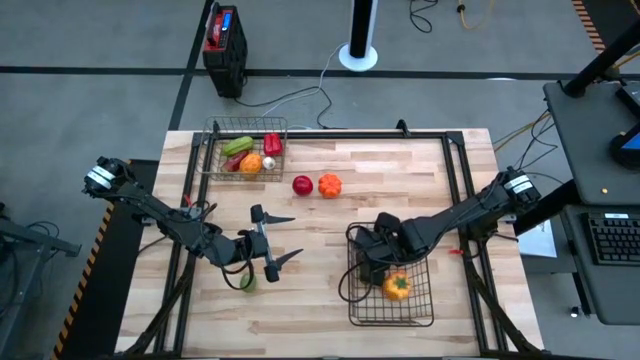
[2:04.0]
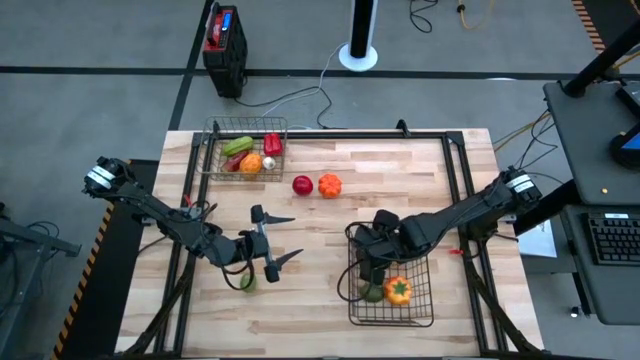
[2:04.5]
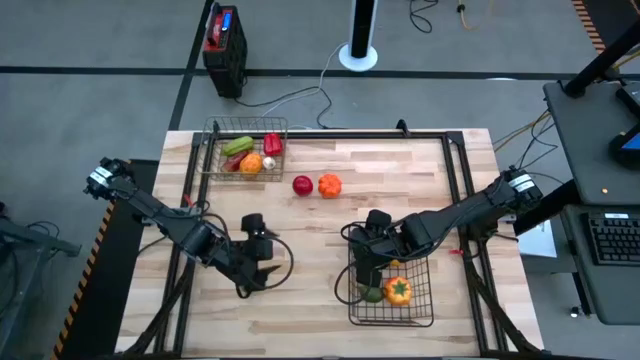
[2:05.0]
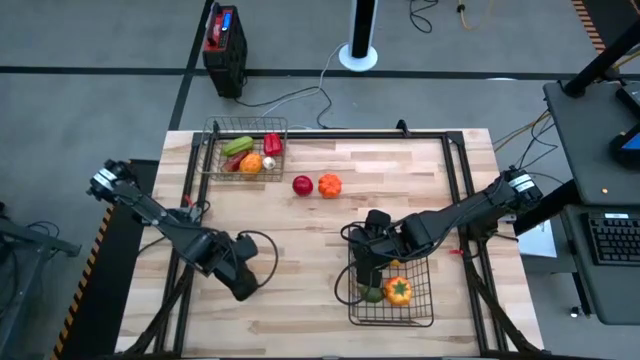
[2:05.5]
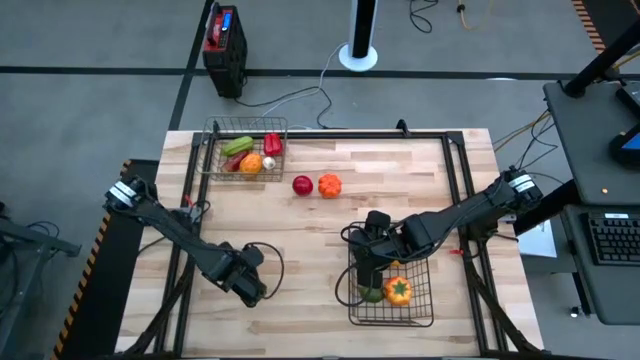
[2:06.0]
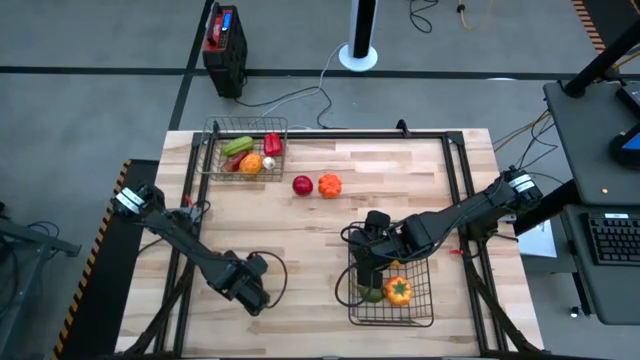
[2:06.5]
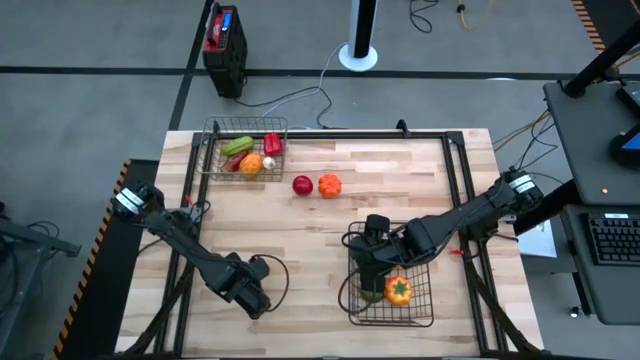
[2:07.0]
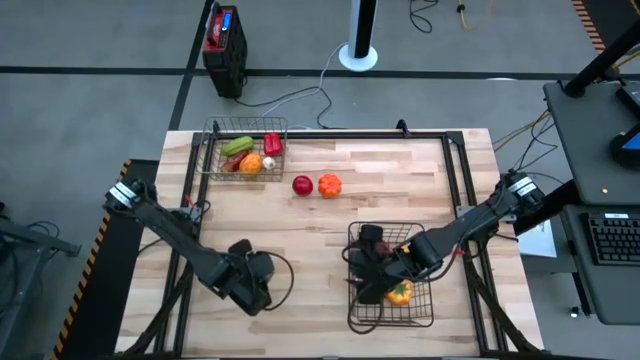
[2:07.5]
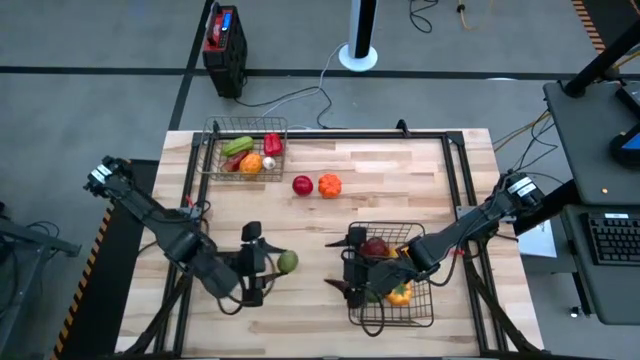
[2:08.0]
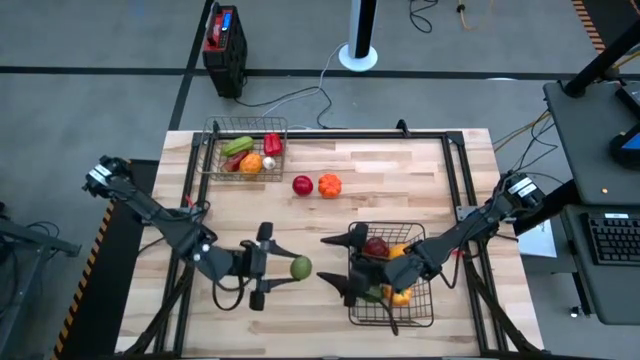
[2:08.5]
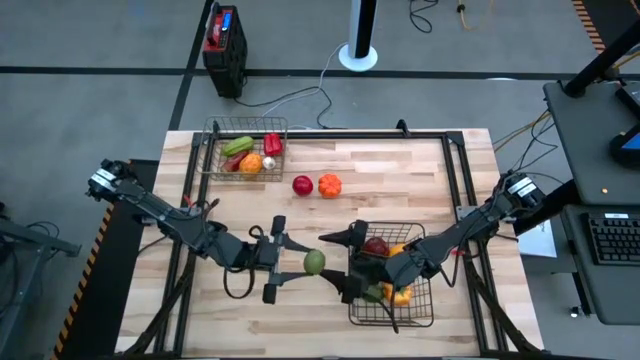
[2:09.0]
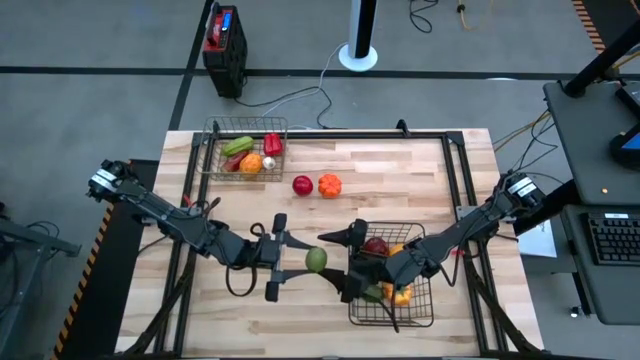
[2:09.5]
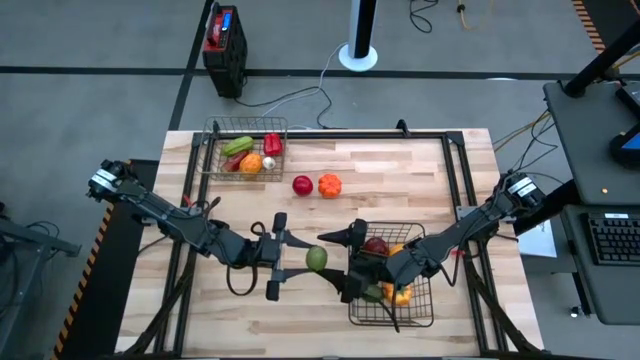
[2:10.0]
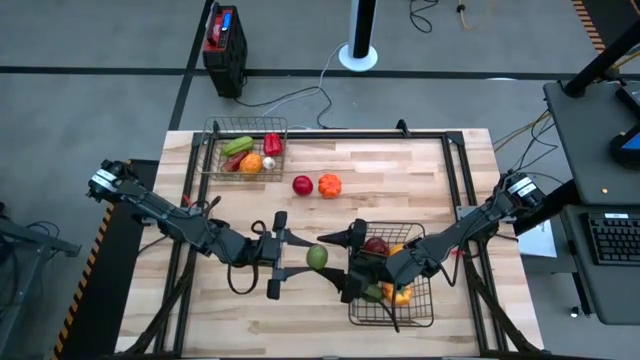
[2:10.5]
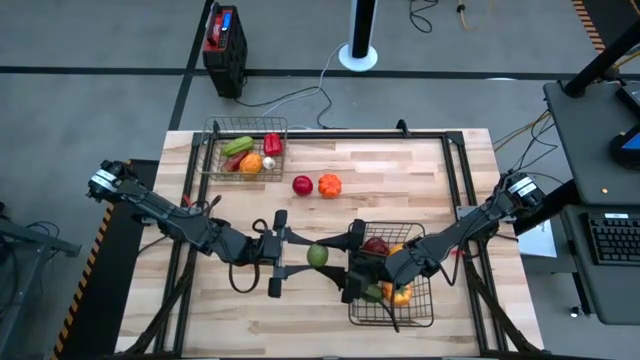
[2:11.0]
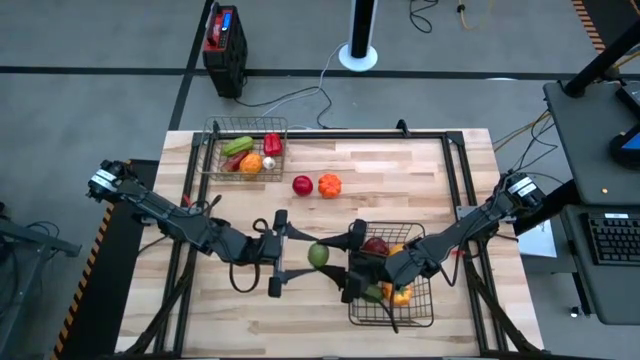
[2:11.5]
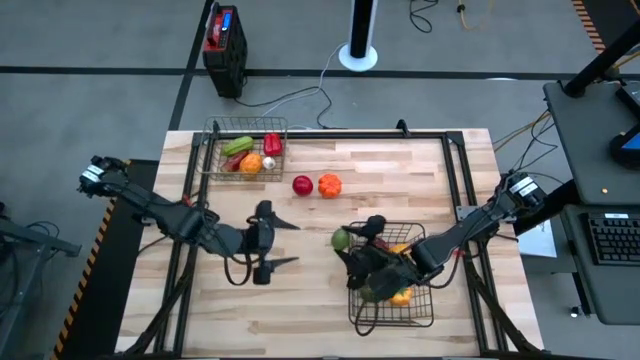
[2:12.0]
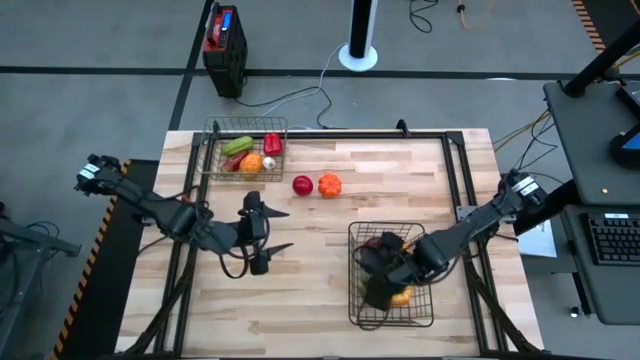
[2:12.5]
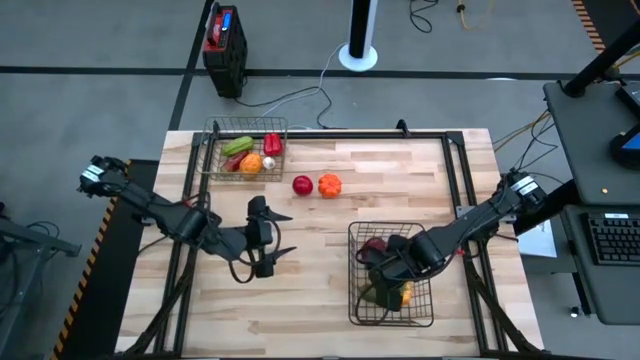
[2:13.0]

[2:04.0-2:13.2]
Task: Sort produce into baskets
Put the green lime into the black wire basket

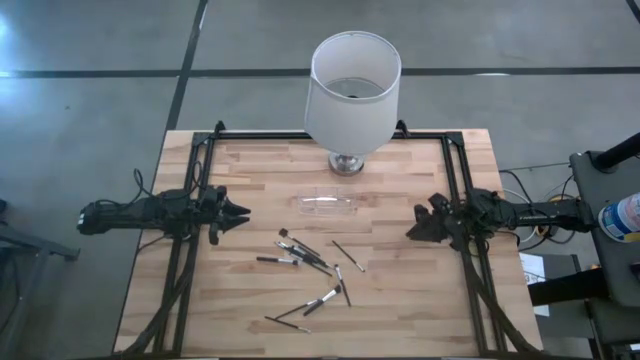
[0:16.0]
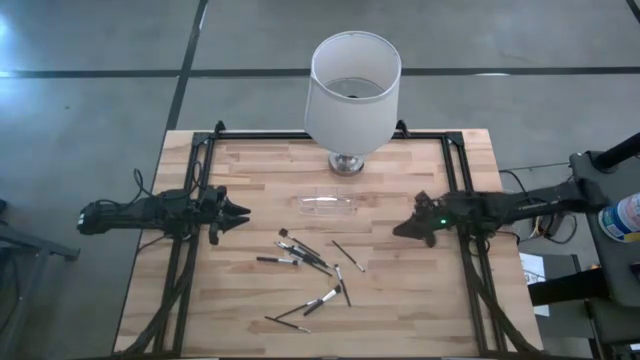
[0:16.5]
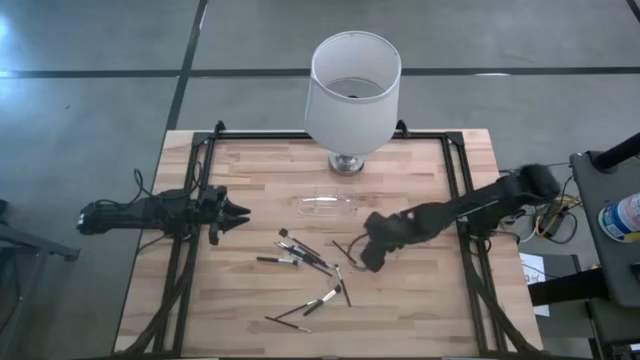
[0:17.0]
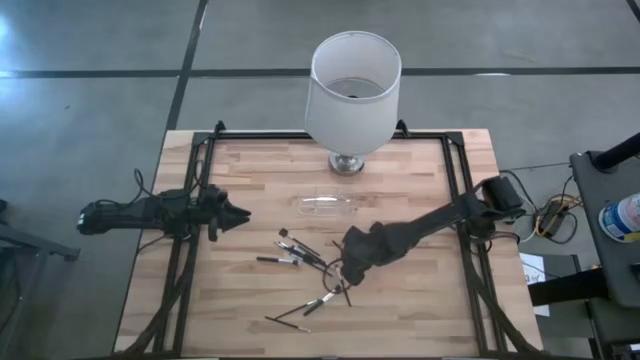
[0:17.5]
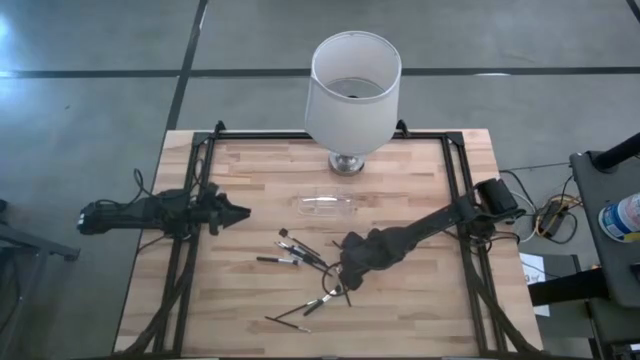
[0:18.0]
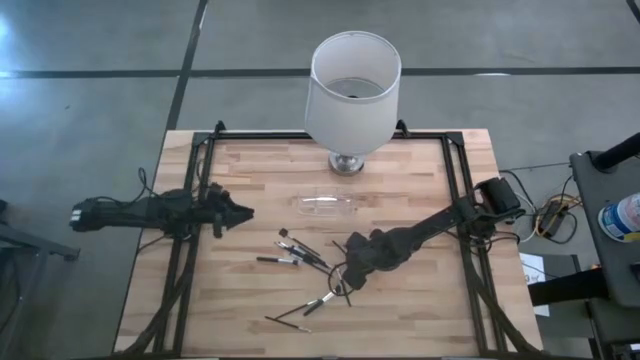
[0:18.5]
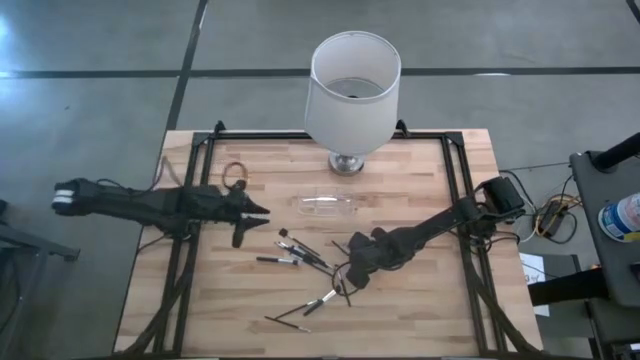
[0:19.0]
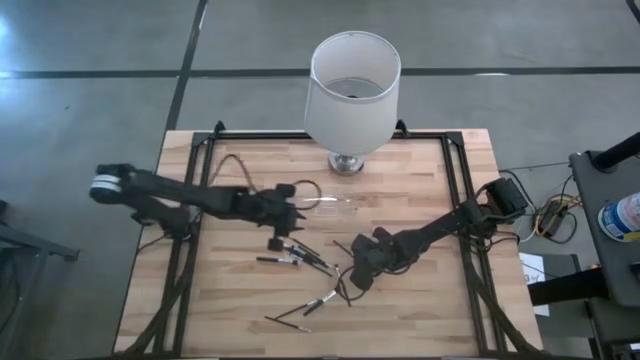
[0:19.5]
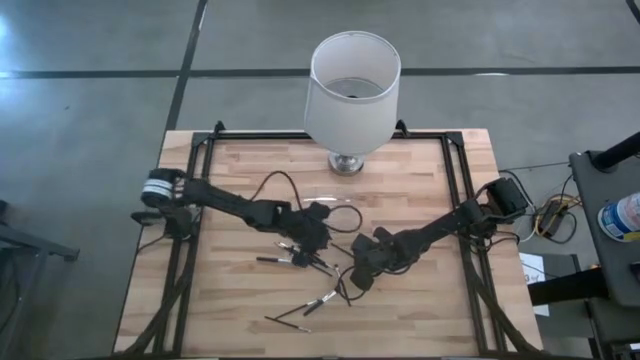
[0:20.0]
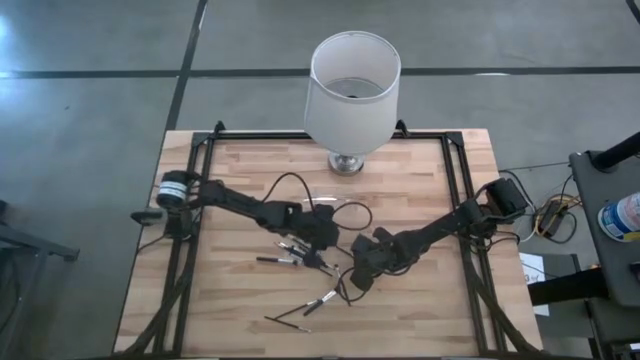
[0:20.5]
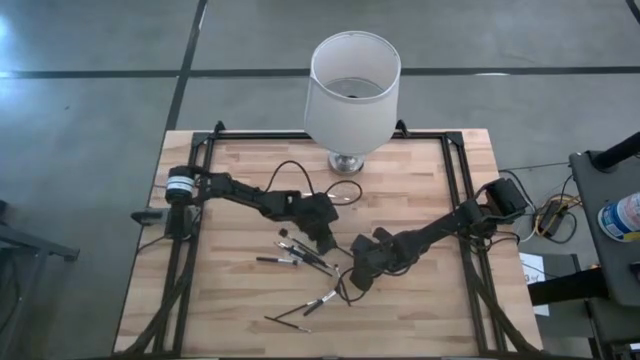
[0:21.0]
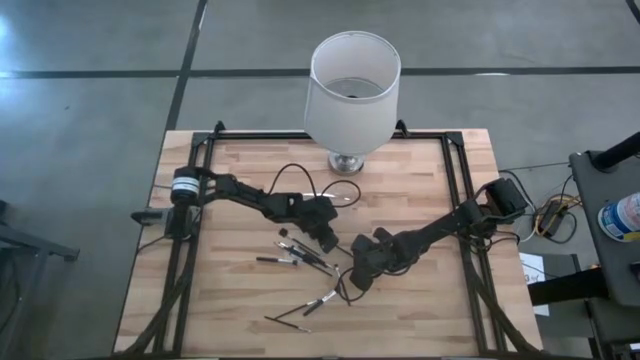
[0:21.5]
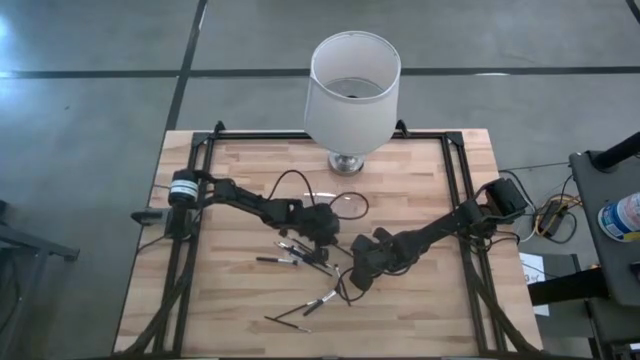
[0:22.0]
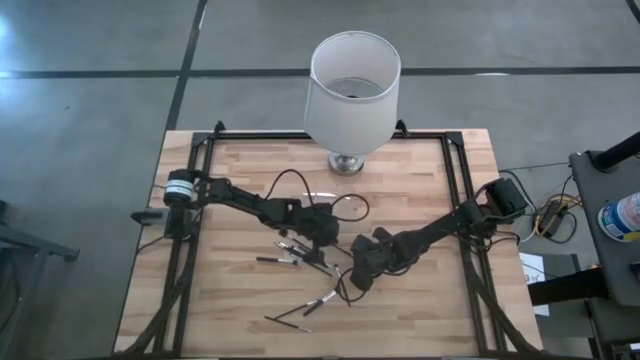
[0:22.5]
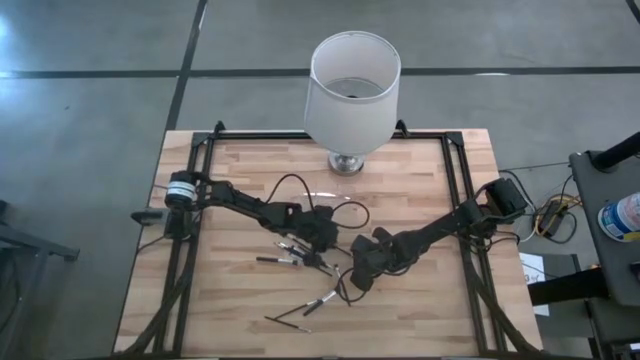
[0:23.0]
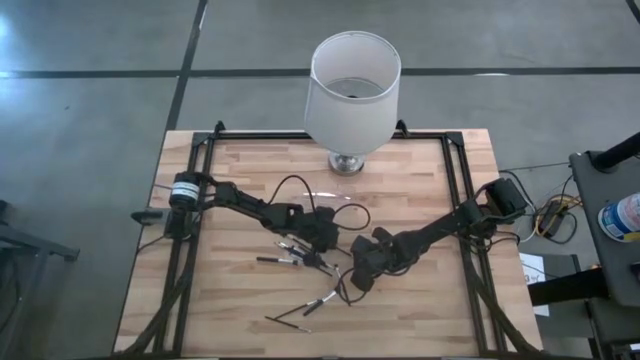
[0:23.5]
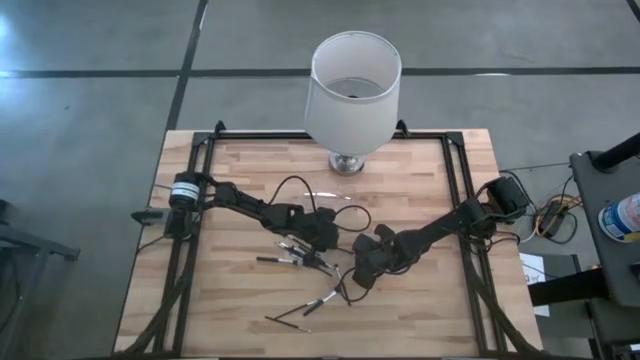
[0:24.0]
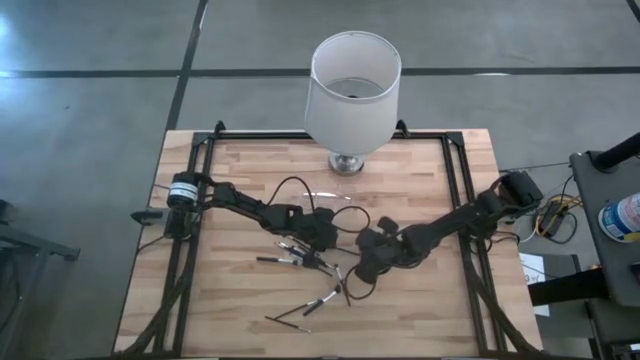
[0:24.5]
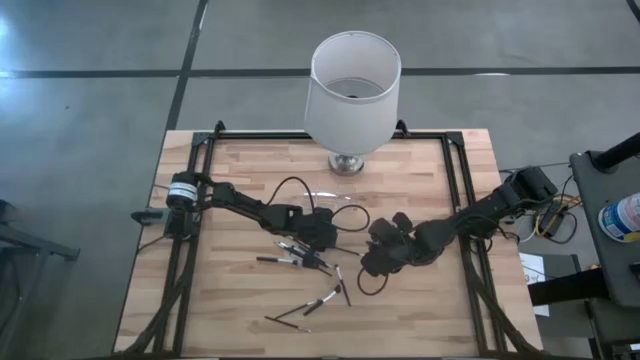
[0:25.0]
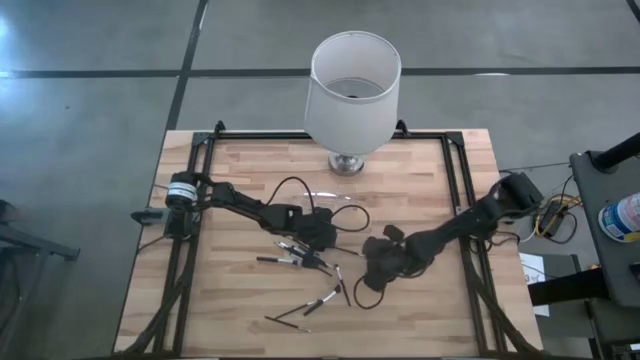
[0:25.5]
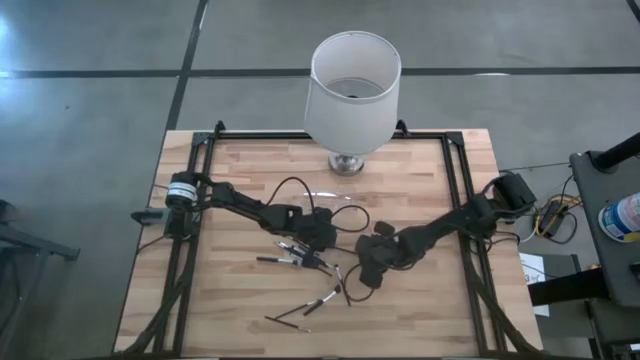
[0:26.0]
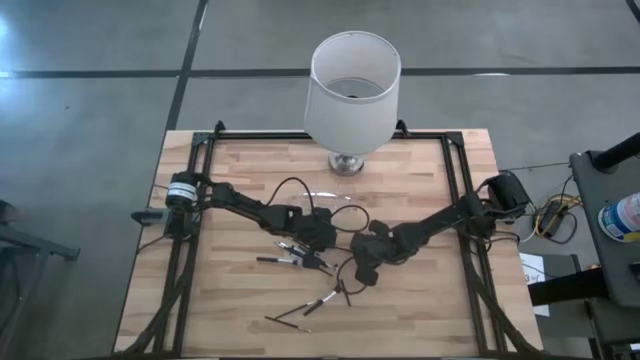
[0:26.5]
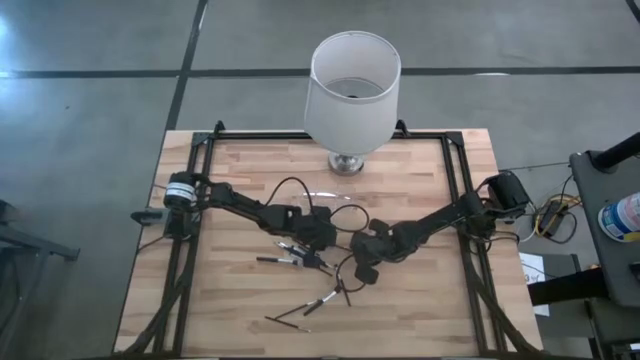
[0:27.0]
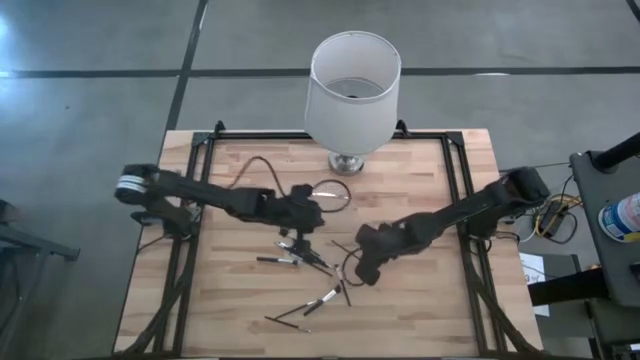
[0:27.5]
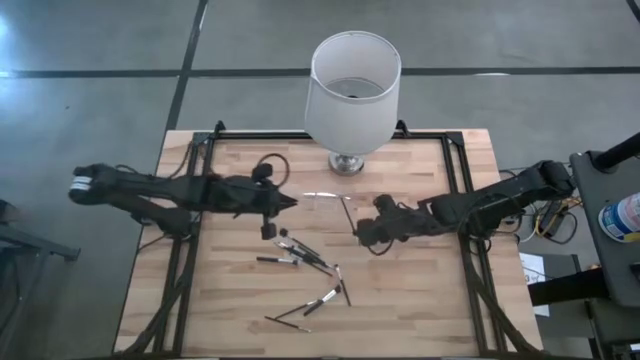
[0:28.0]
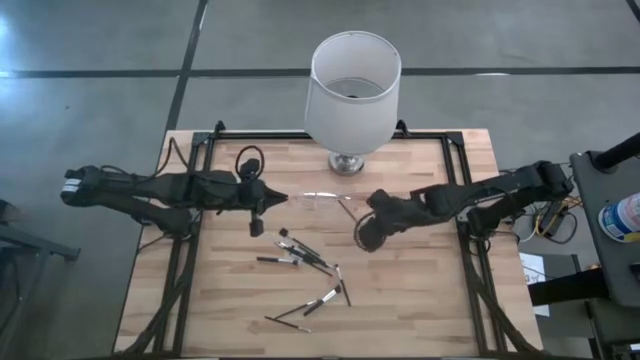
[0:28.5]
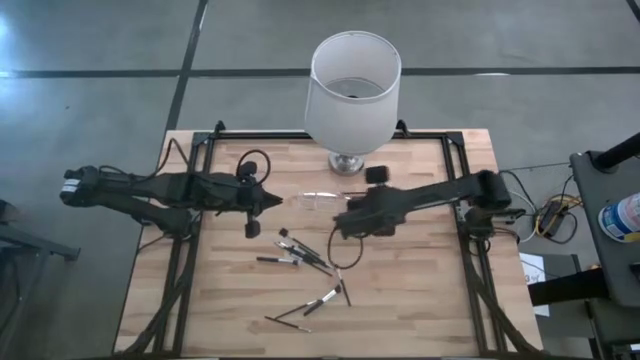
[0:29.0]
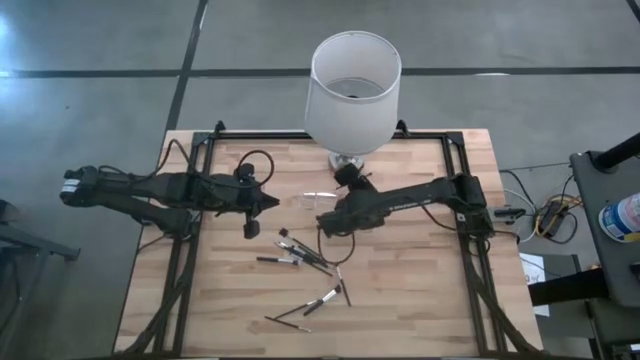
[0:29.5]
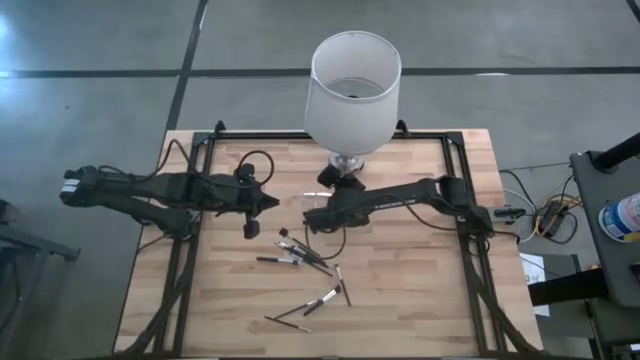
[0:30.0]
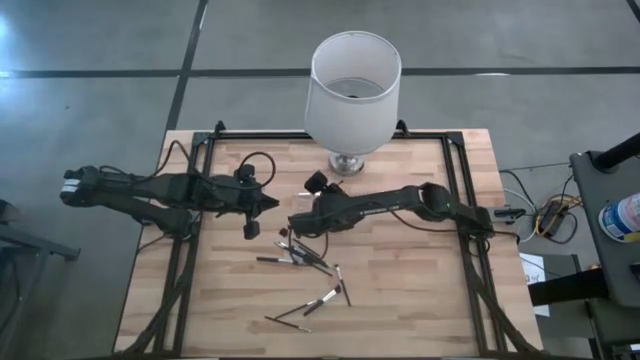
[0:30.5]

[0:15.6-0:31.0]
Task: Put items in baskets/containers
Put the eyeshadow brush into the transparent organizer
